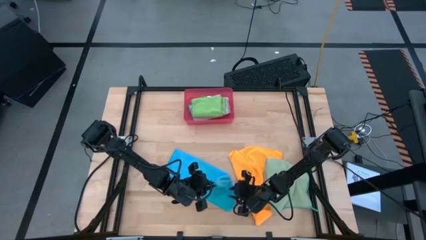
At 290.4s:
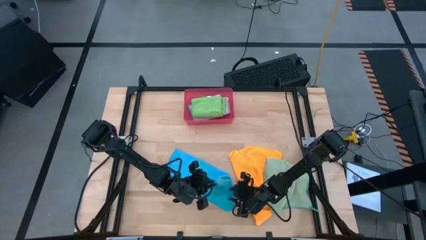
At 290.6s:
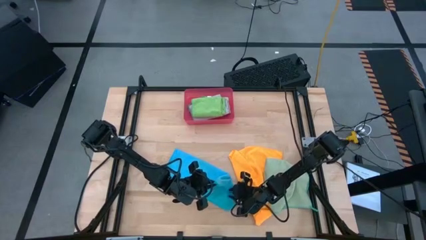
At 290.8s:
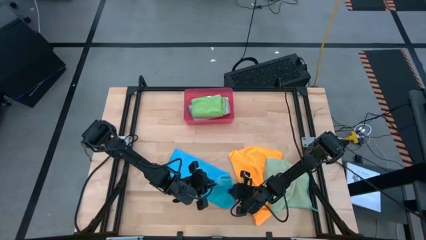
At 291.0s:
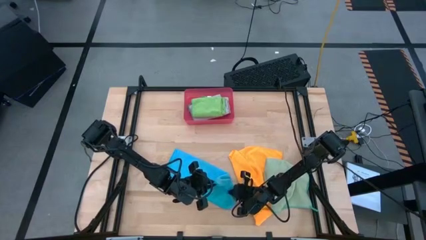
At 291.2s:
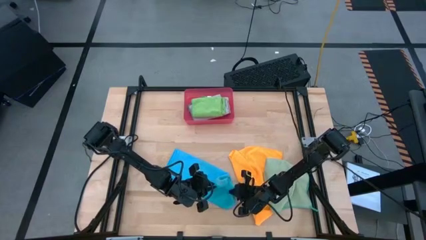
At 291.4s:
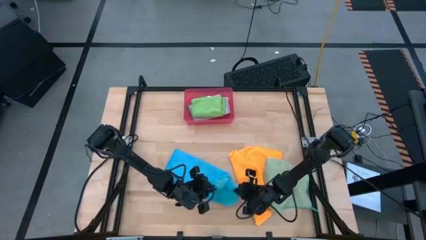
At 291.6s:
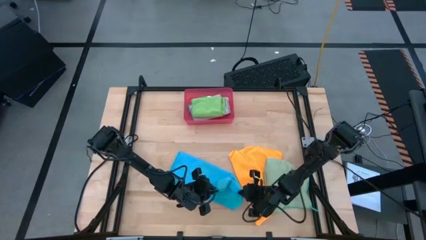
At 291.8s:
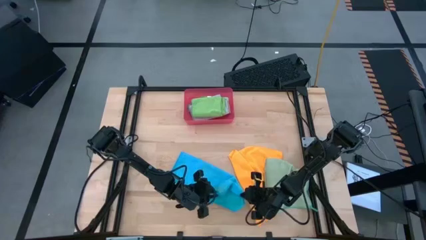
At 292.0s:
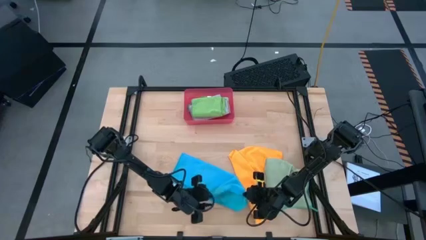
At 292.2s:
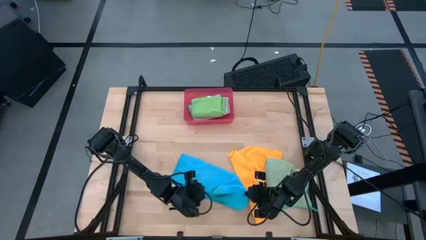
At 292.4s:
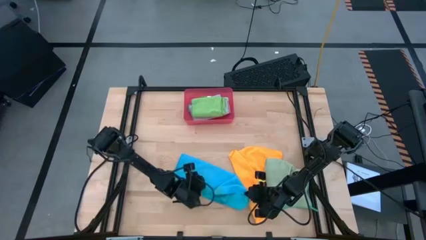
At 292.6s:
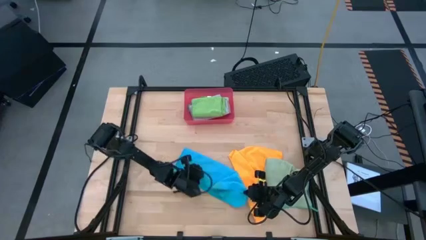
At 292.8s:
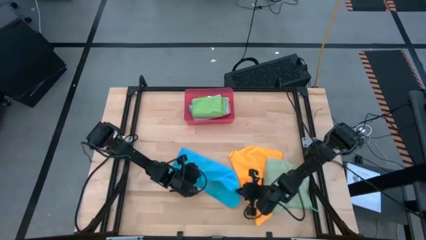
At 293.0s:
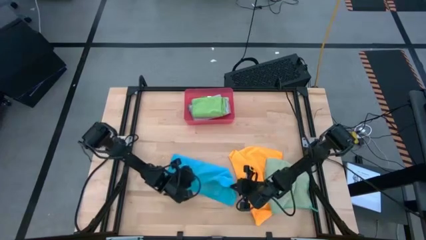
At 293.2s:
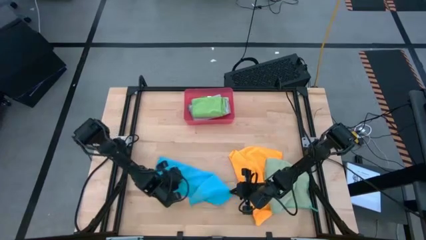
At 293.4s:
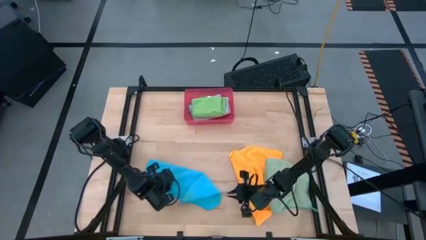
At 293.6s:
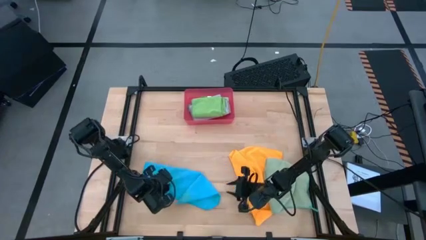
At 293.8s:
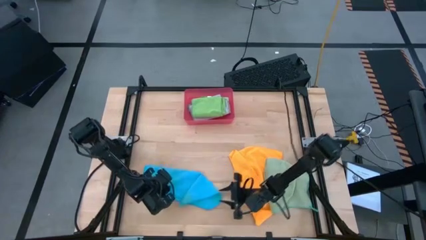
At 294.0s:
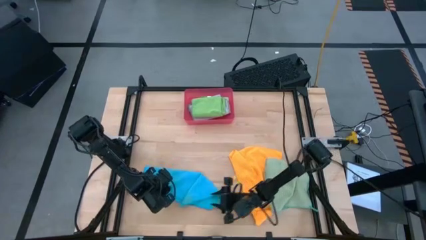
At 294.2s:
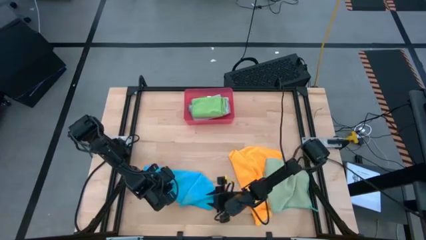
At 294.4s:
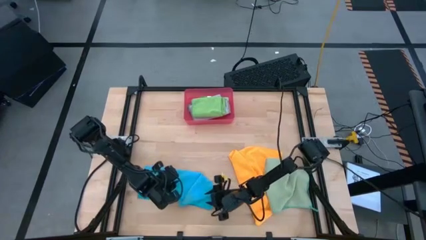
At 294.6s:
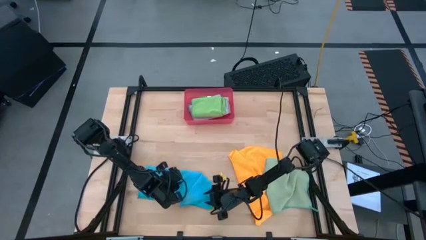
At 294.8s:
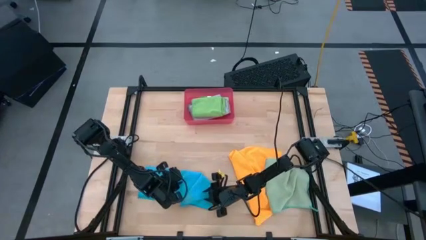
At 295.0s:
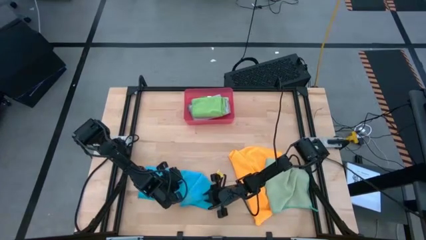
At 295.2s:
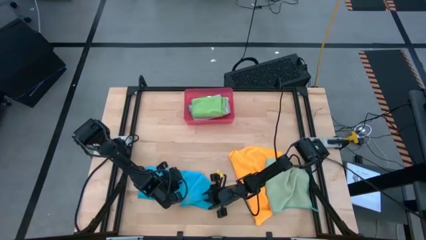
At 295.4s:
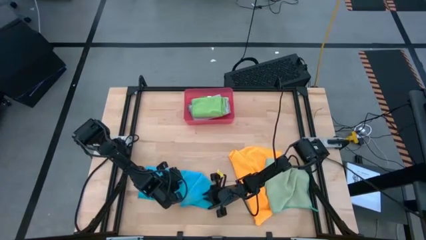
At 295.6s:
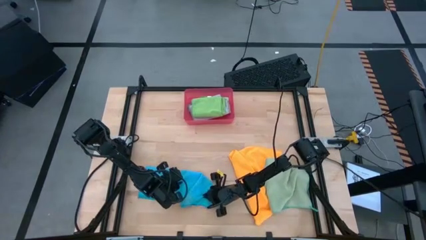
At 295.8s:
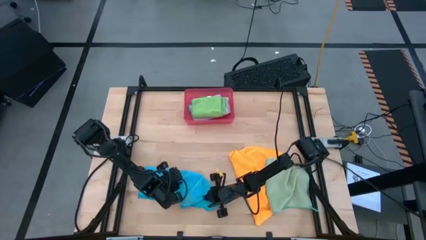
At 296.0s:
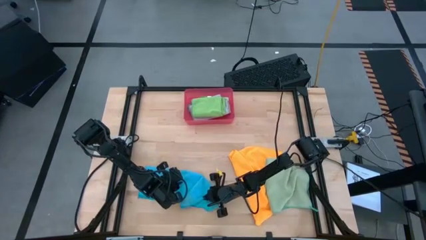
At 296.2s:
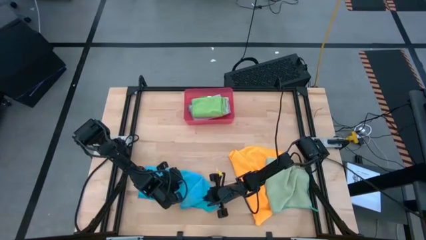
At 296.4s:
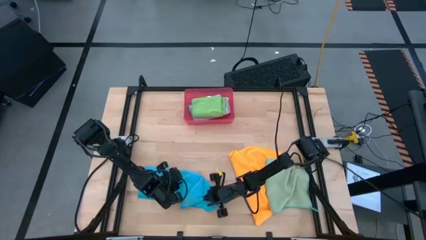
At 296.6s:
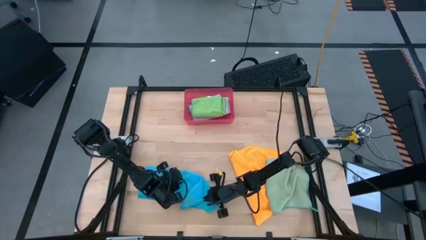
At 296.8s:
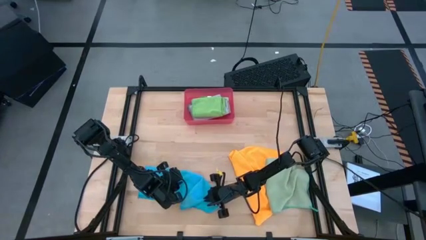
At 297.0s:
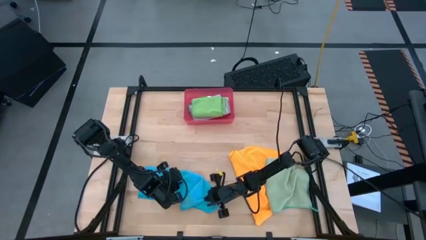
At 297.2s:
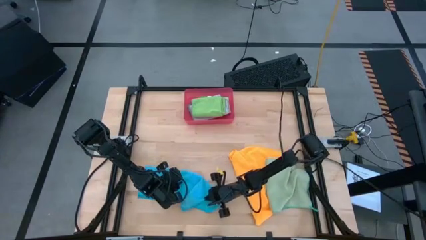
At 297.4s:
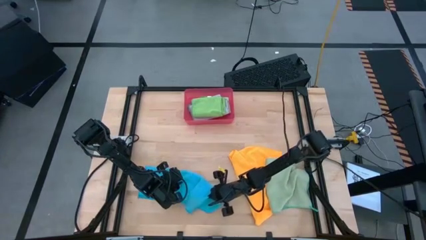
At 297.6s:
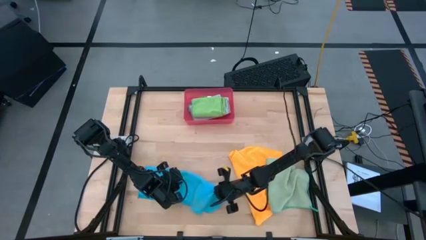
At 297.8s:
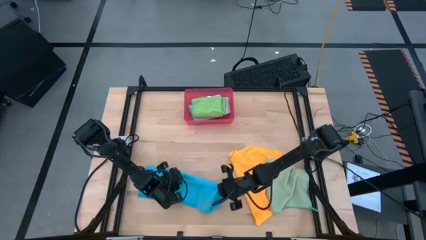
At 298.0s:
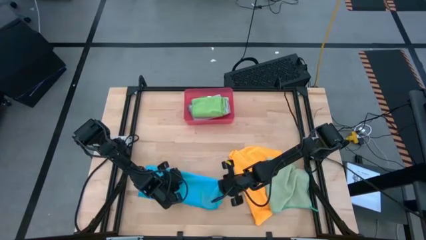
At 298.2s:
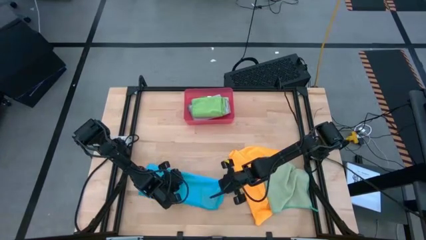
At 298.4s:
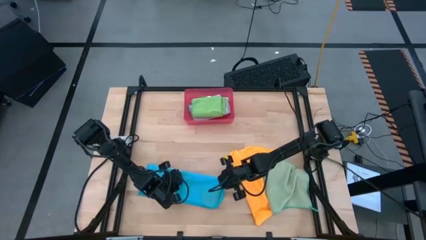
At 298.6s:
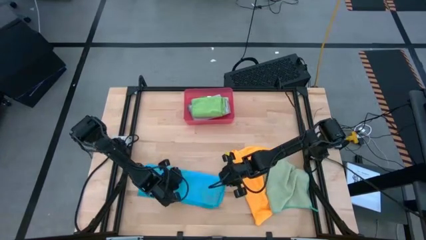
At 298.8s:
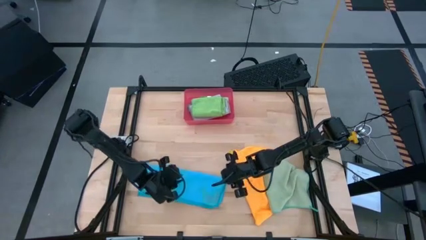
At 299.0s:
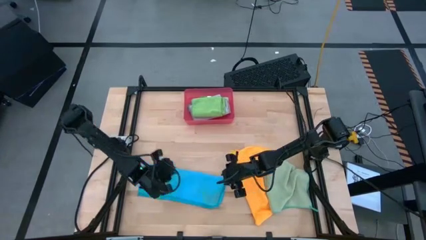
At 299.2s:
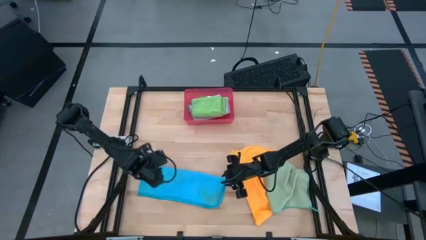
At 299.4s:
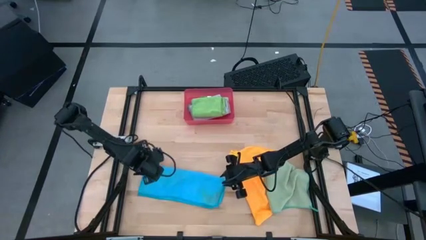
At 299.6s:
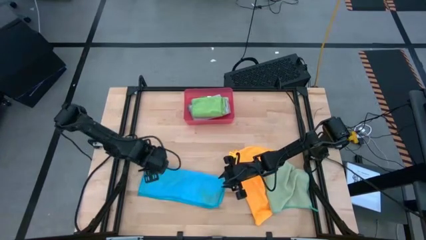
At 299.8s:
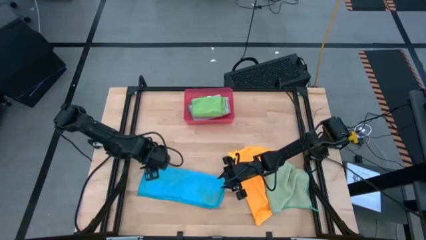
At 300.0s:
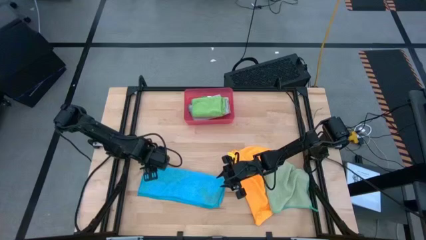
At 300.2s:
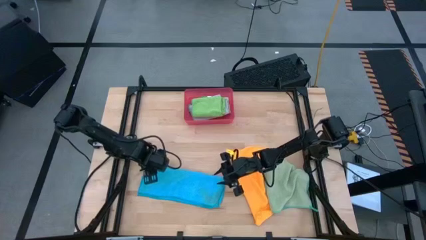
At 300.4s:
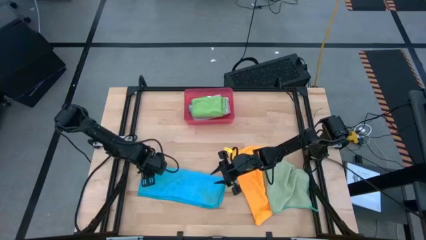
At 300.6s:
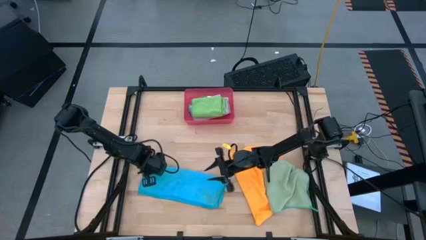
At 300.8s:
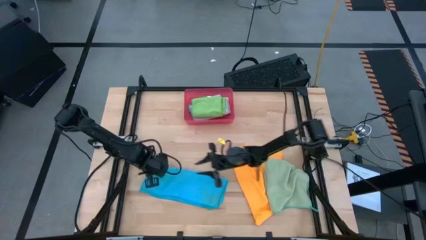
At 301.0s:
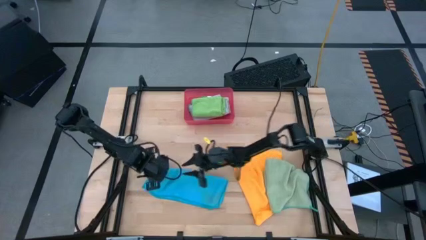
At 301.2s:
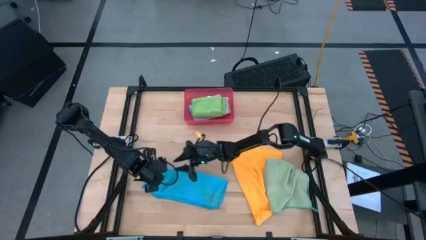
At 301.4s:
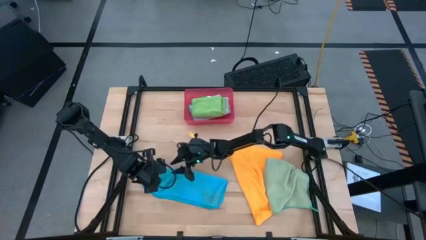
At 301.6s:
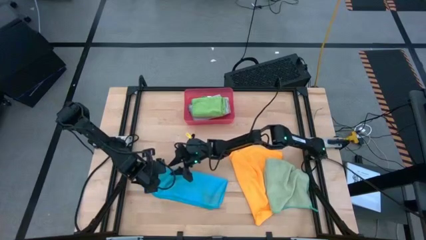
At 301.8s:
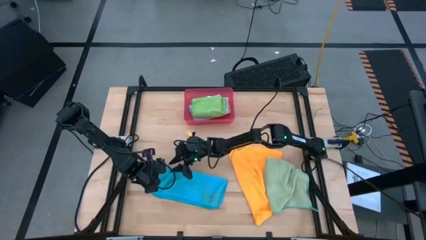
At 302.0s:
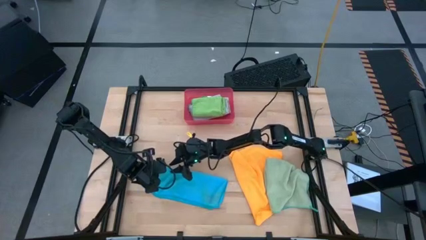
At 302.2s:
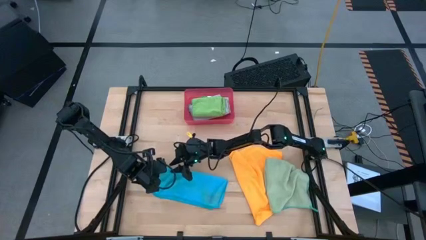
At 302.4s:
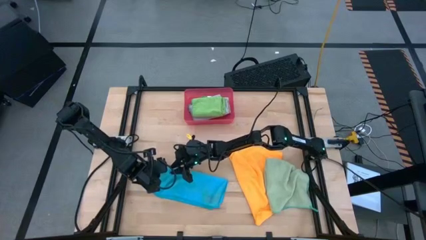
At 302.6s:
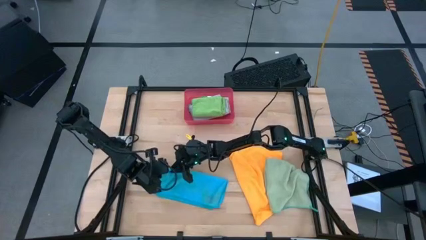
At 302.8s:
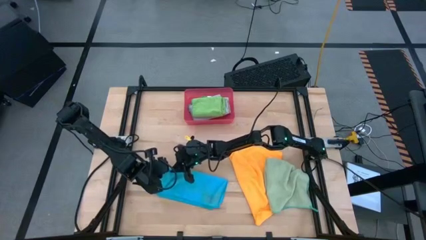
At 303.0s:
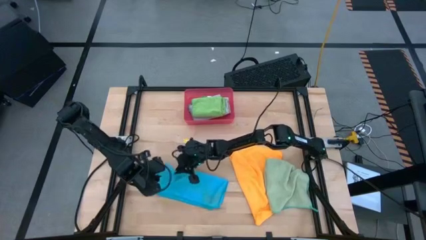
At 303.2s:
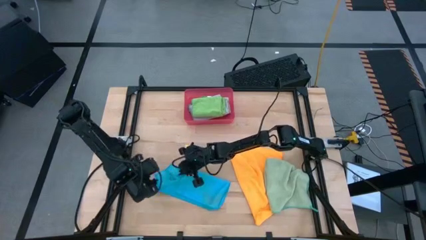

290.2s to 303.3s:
Task: Fold microfiber towels
Fold the blue towel

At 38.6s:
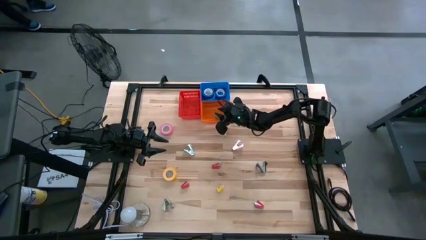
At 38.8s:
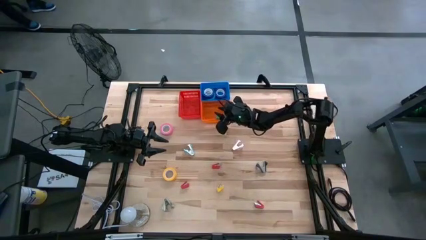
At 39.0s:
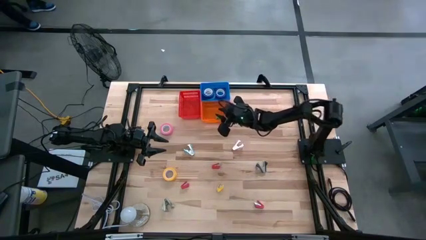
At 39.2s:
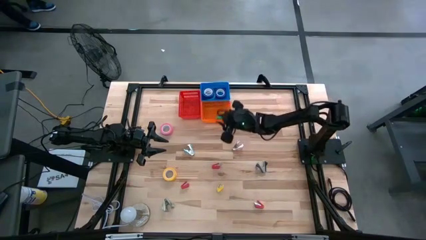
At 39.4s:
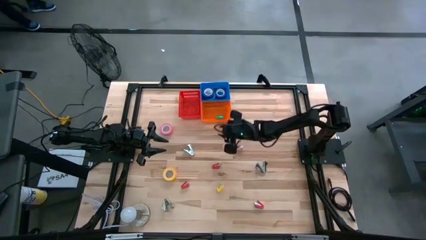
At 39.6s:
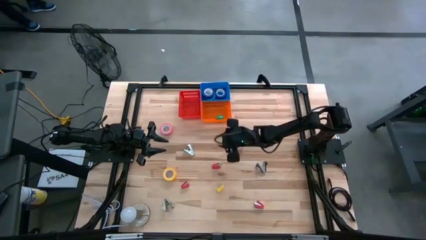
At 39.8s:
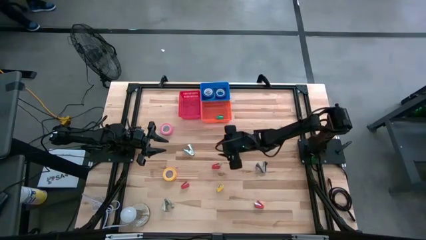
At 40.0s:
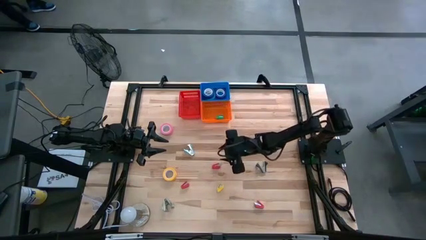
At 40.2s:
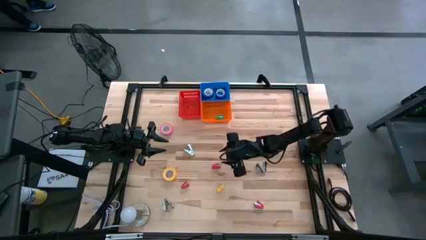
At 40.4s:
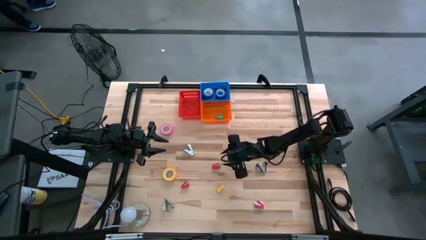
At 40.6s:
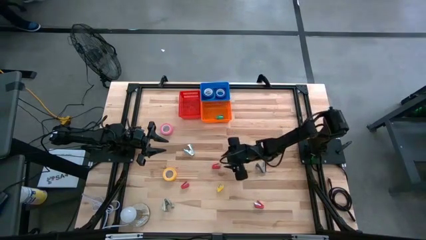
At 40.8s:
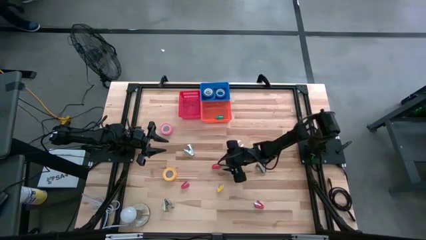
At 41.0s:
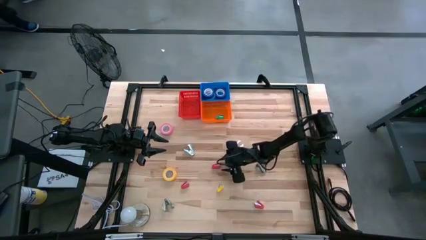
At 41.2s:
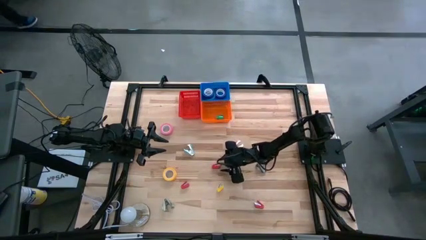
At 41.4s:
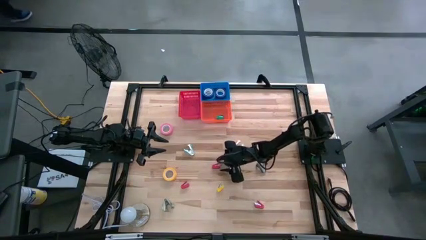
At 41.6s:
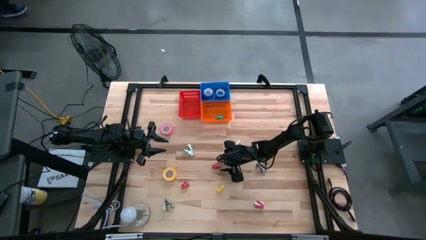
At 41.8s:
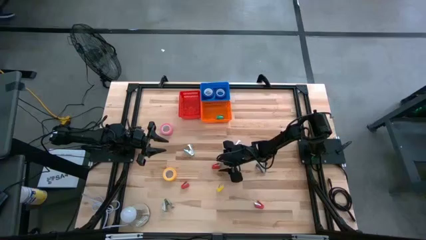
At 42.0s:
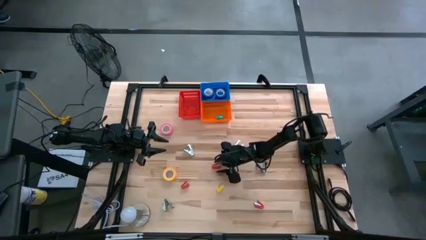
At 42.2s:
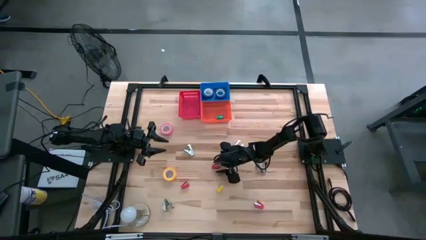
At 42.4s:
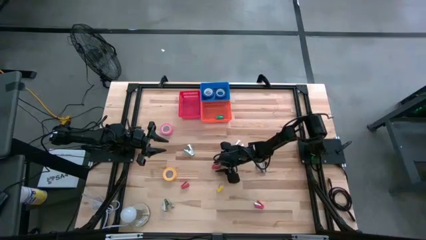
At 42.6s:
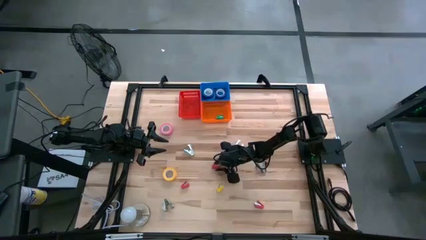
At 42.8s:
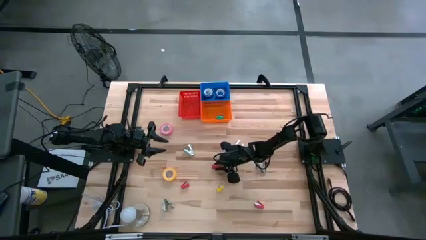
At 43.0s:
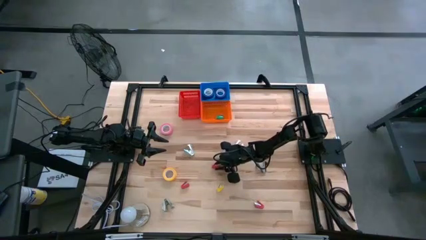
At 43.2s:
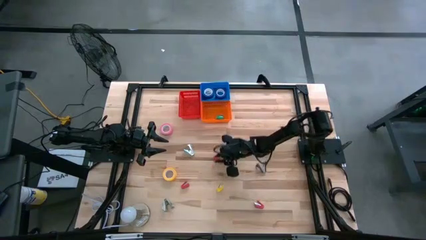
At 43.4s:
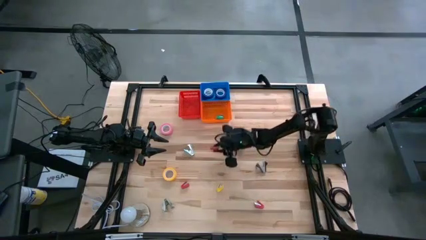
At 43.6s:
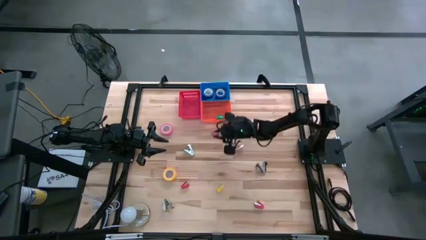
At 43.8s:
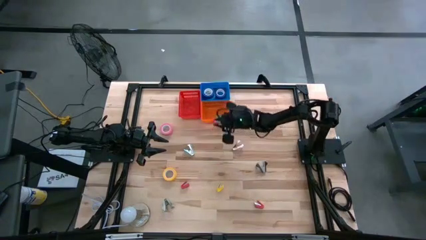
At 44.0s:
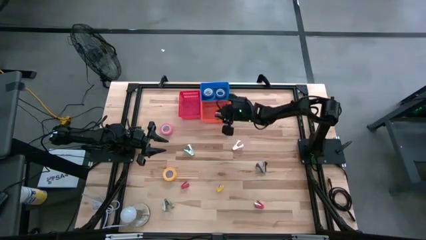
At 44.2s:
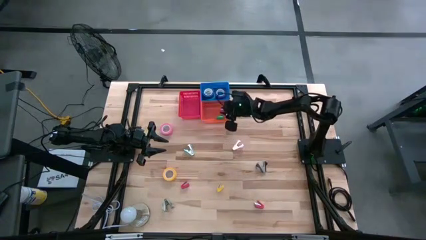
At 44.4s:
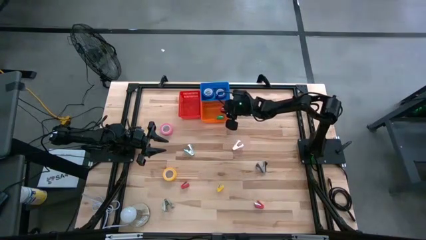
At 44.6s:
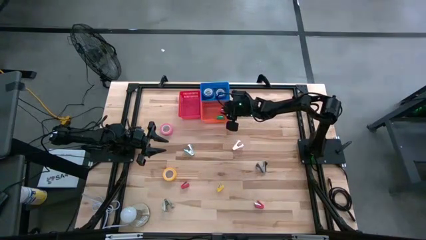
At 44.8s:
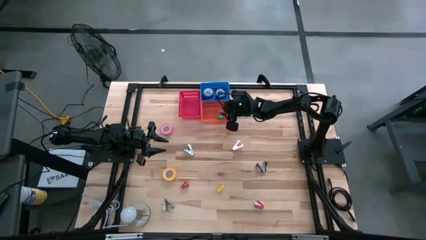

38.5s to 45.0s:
Task: Pick and place Stapler, Stapler remover, tape
Put the middle red stapler into the orange bin
